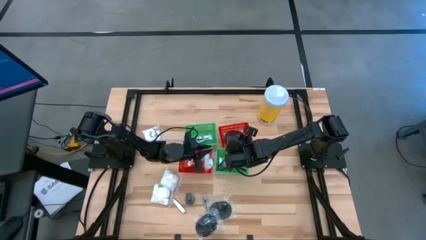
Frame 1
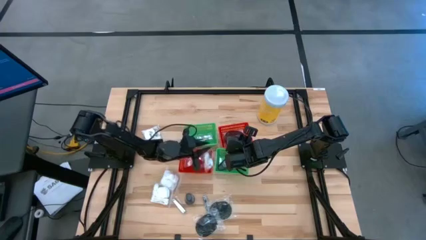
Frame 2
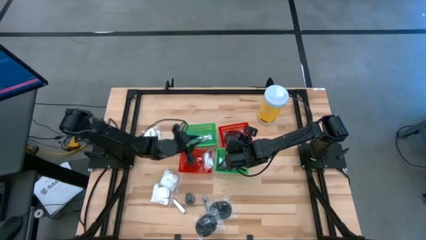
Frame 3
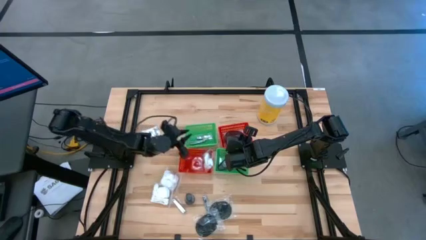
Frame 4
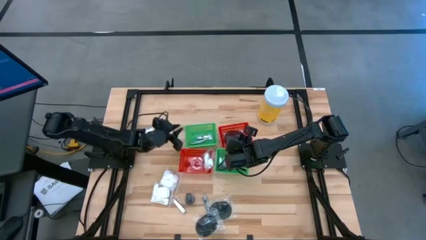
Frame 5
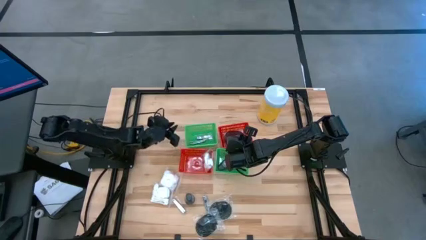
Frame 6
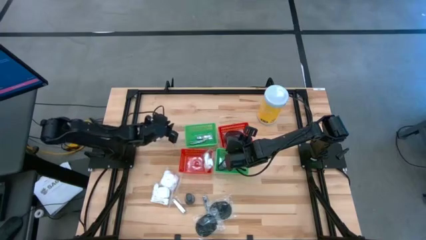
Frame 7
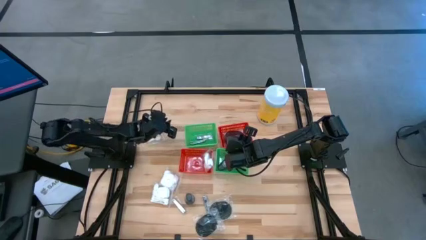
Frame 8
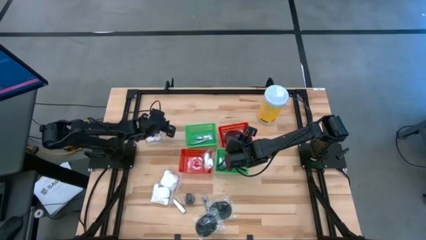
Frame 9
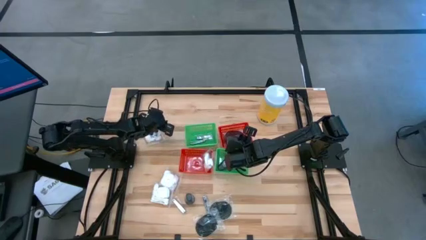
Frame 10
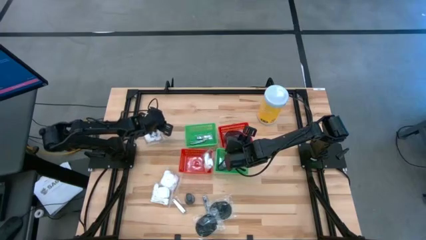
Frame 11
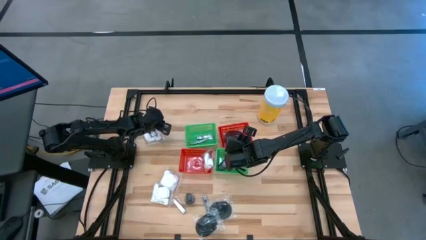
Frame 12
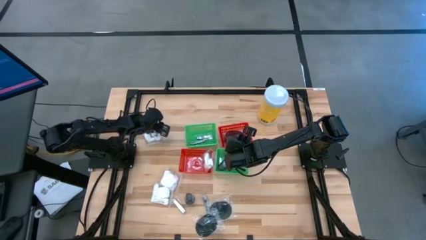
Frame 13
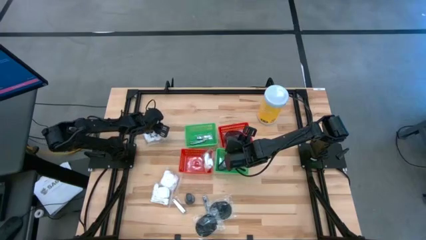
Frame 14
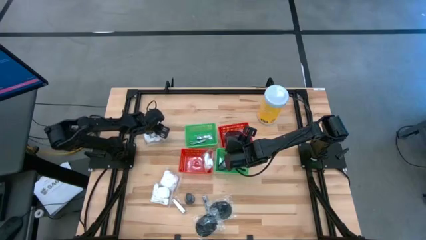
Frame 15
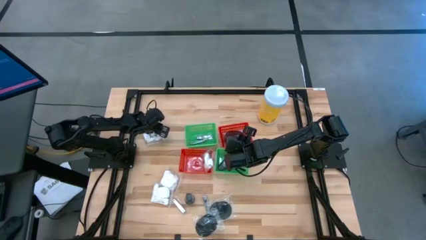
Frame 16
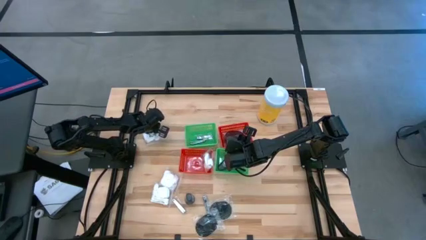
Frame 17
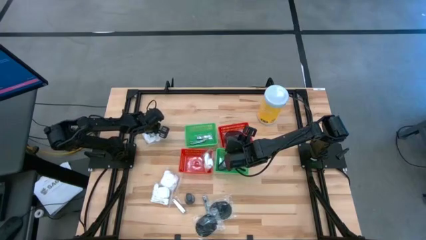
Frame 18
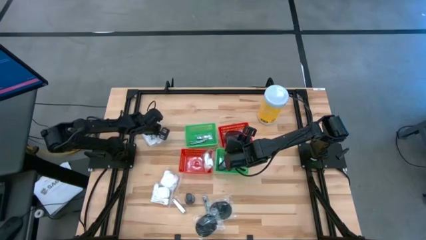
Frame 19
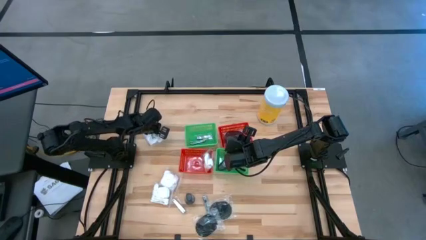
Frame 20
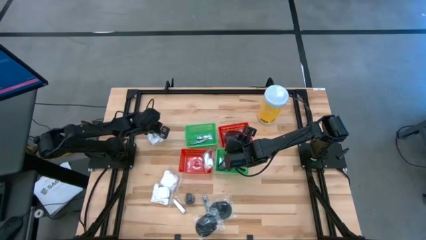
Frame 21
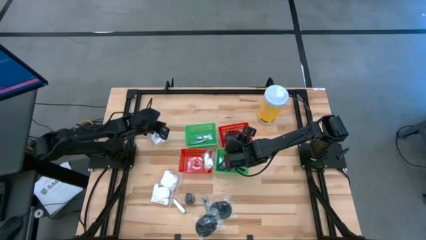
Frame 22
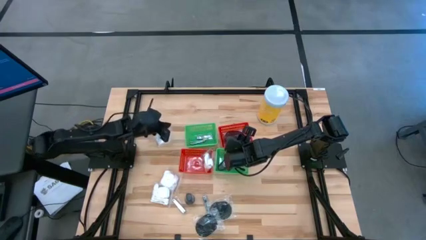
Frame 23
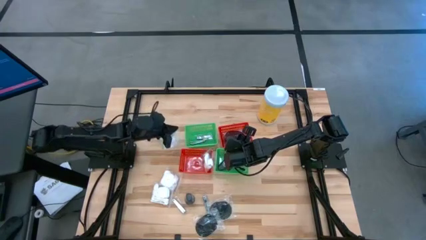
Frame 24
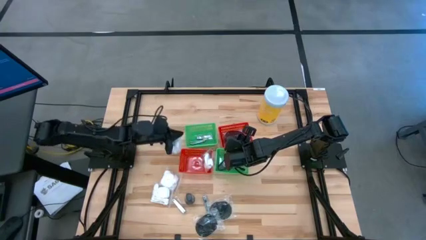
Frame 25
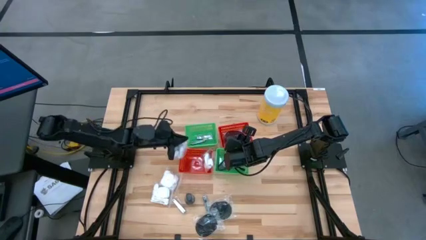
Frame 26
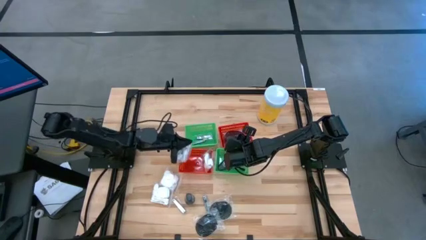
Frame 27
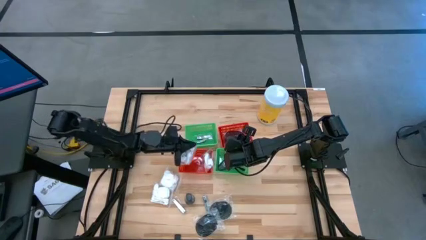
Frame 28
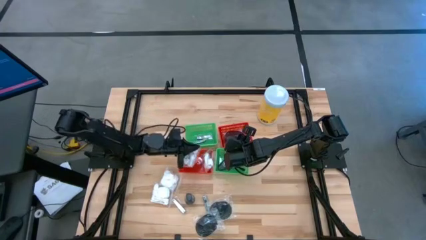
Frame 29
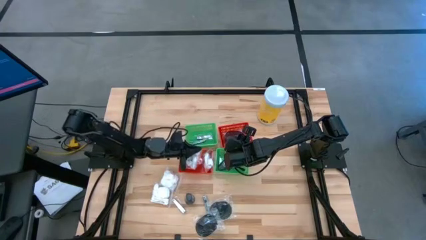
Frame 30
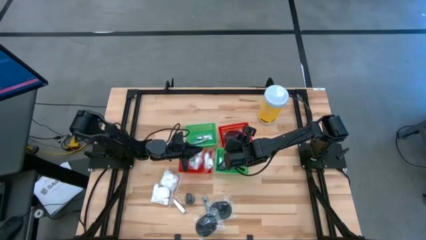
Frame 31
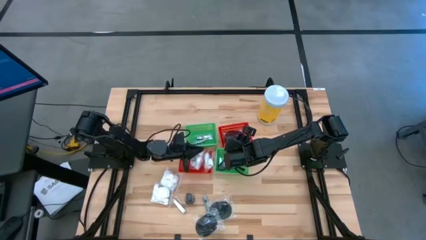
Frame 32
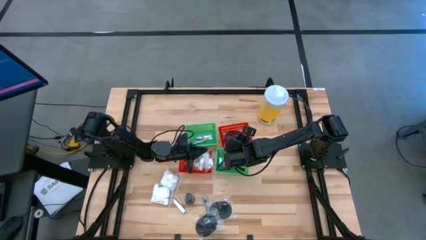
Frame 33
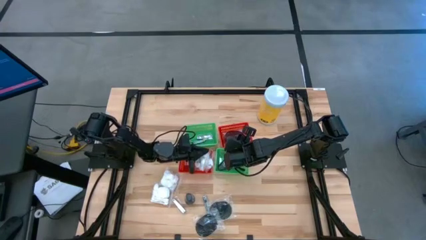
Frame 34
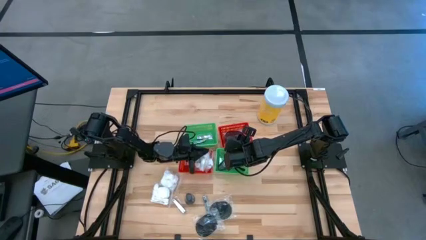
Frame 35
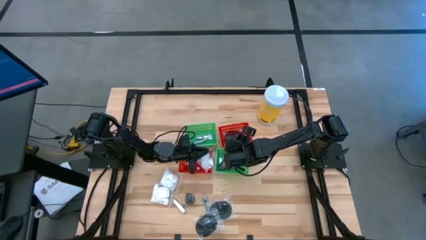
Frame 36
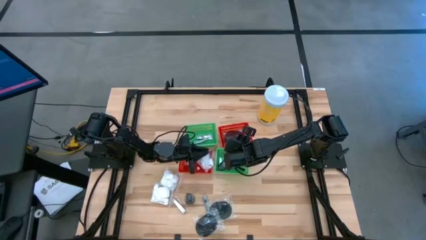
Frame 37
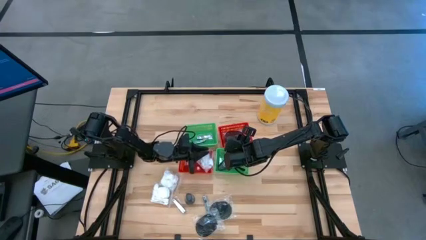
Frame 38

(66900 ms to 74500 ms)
Task: Pick & Place Travel size toiletries
Put the white cotton pack into the left red basket

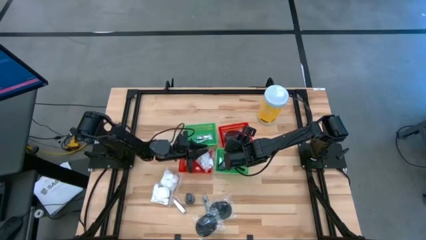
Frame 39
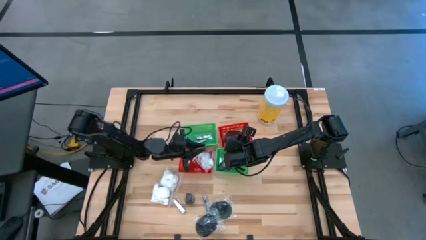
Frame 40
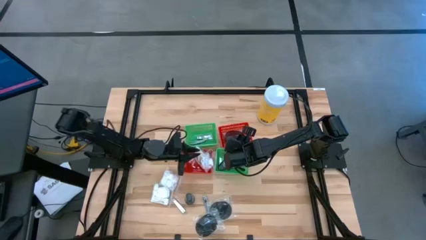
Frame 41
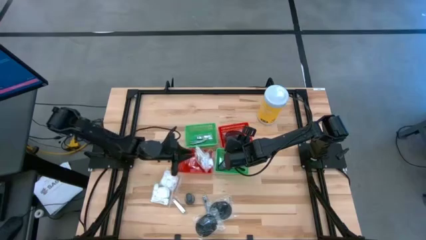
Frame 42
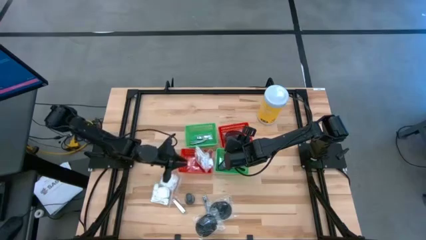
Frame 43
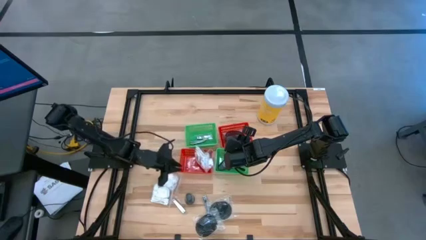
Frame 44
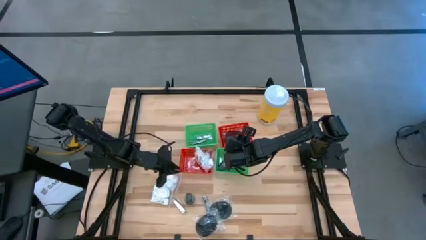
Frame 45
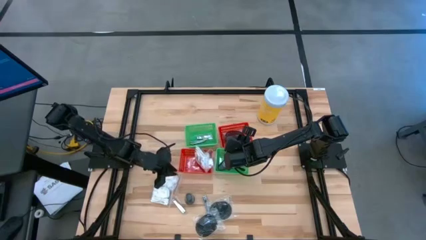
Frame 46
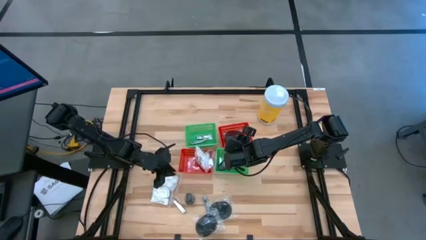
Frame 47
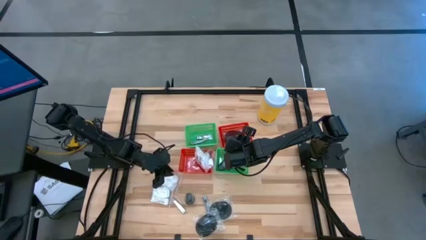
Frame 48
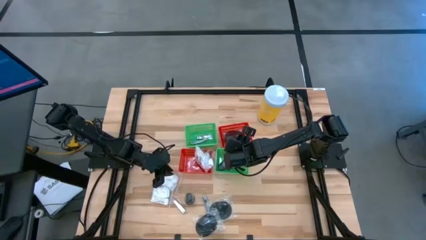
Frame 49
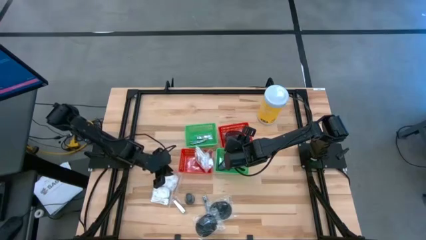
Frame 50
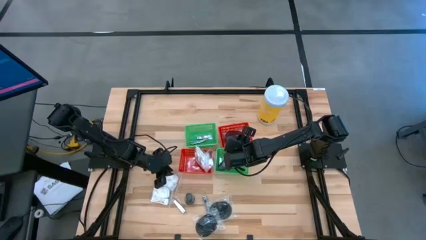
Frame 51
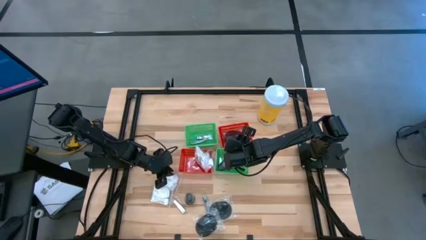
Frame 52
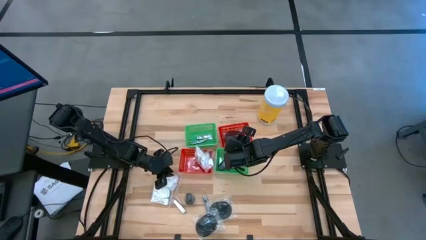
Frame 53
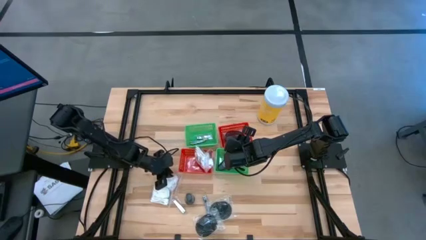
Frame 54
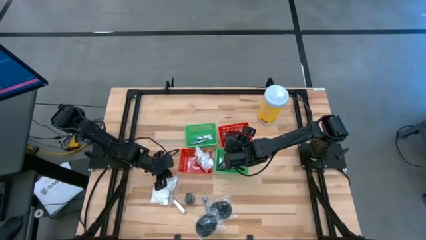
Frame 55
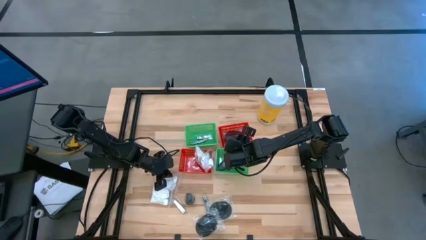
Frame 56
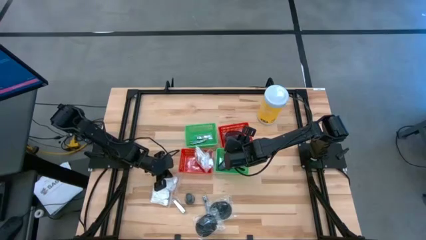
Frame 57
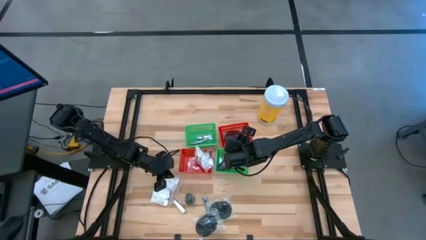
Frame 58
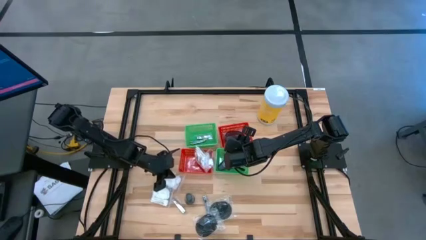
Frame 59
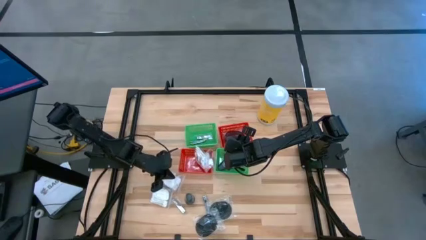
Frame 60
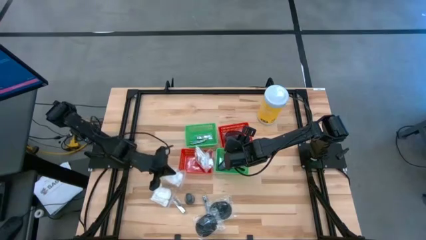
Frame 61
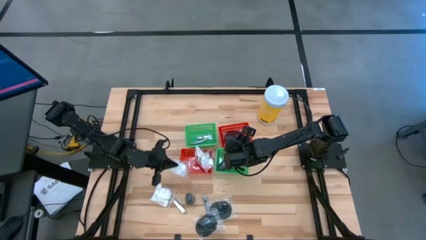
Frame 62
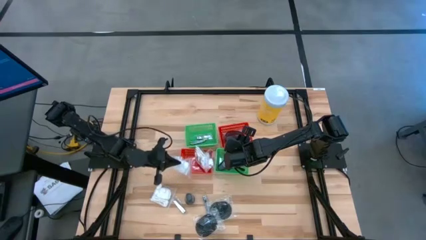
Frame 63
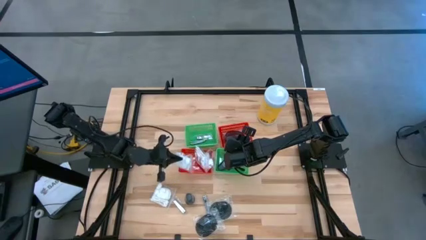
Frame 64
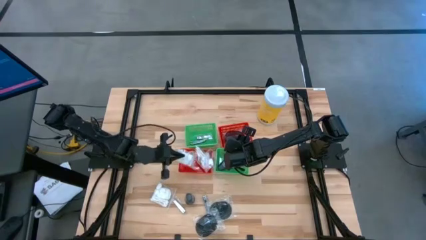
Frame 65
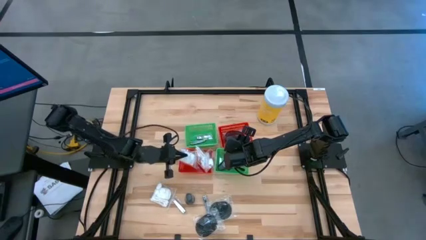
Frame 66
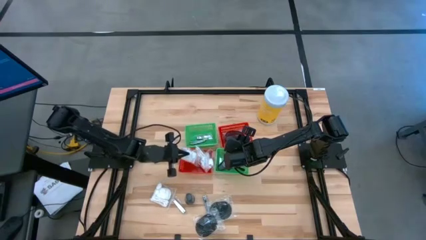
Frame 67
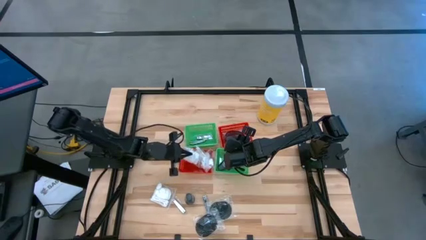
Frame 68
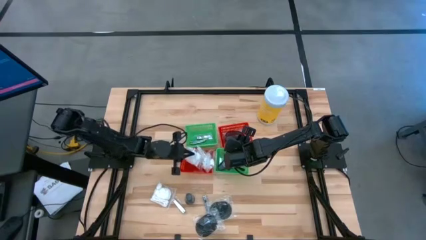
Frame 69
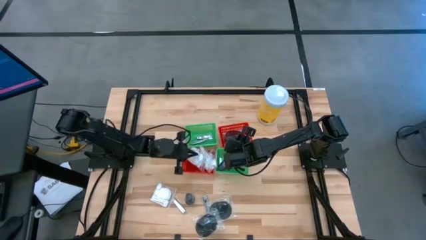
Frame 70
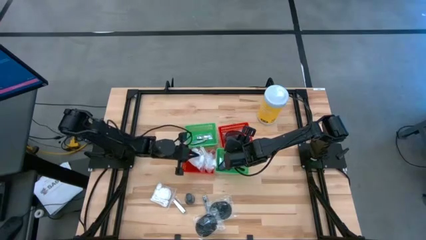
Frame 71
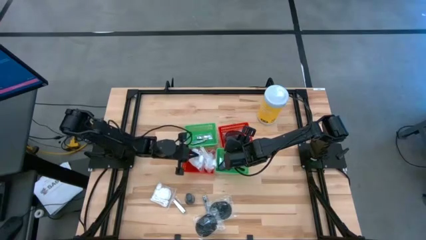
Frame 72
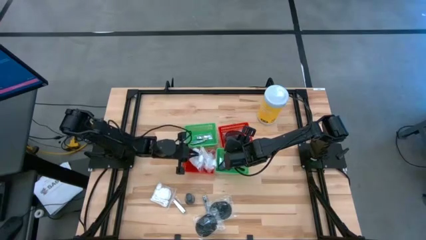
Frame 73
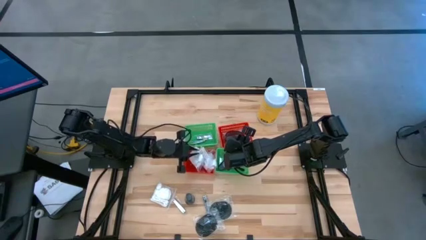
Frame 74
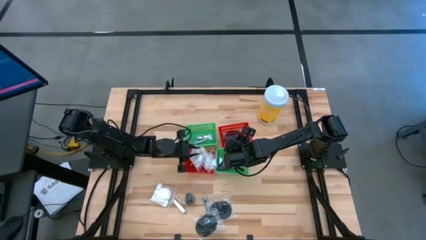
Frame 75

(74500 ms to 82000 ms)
Put the white cotton pack into the left red basket

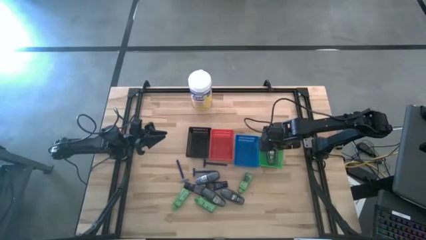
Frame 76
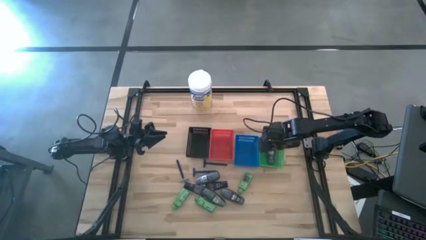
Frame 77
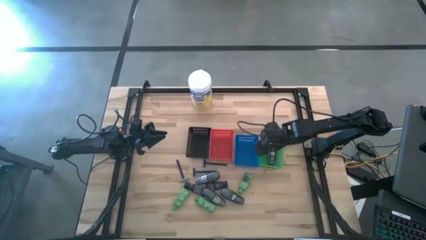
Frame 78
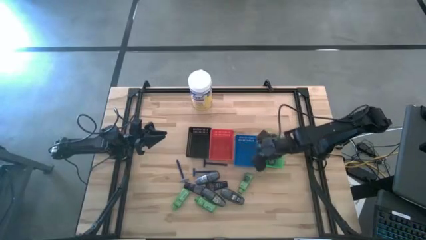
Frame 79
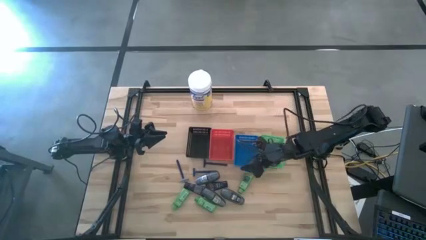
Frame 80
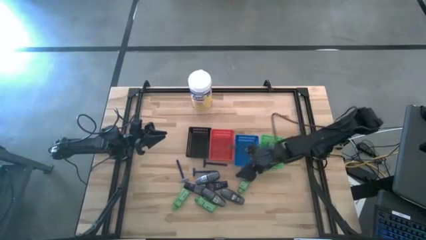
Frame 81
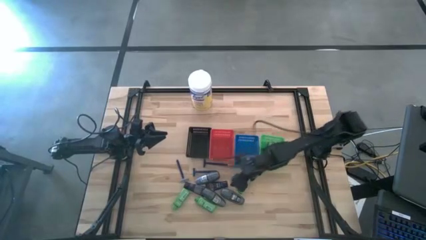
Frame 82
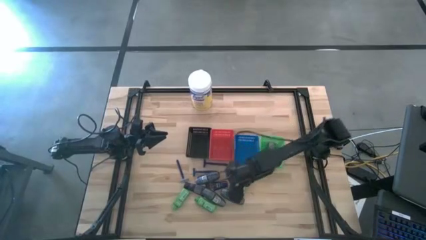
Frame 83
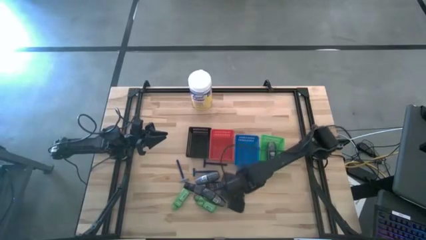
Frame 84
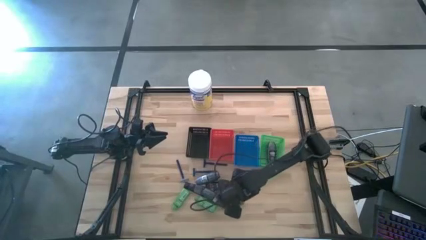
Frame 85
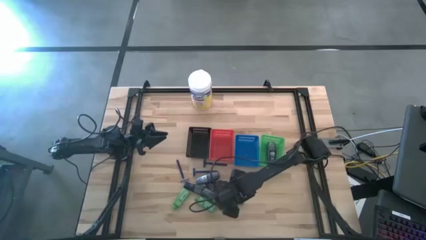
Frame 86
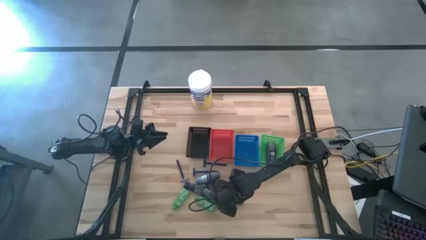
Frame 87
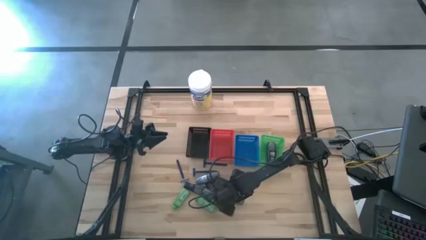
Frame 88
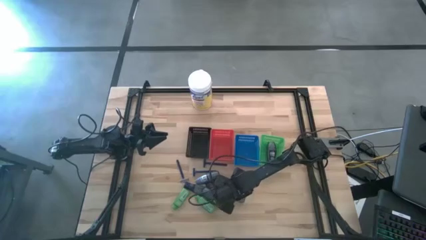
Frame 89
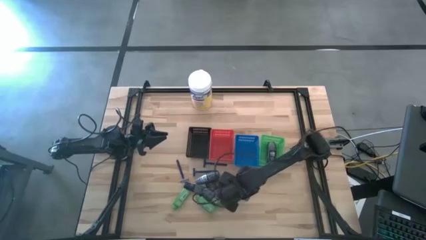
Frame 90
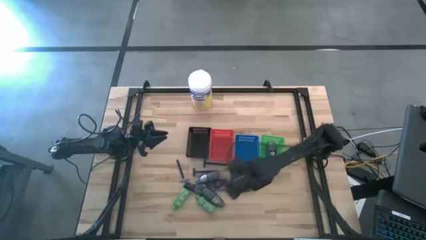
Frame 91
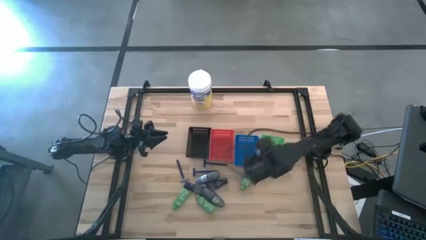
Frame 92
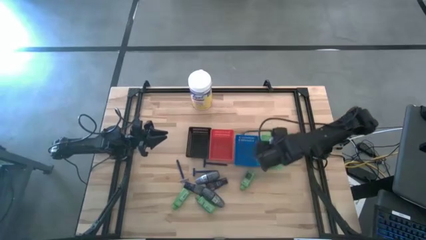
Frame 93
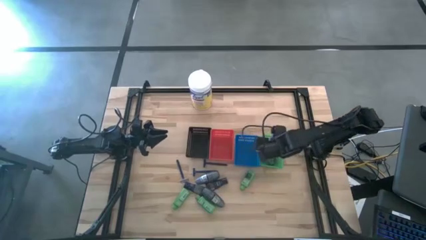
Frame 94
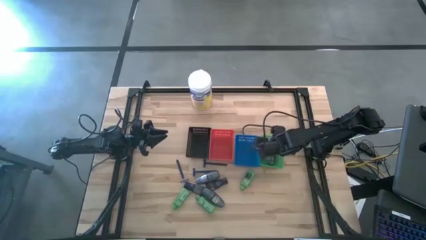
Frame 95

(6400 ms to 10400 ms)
Task: Pick & Place Travel size toiletries
Put the gray deodorant into the green bin
